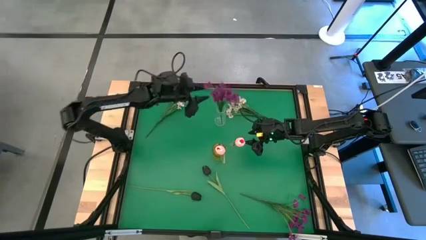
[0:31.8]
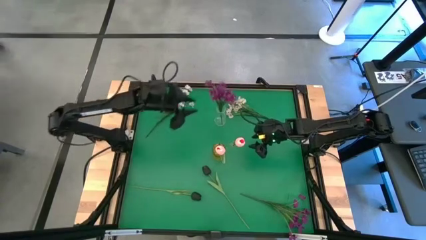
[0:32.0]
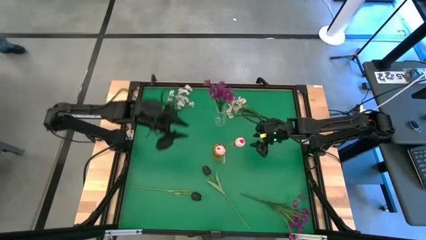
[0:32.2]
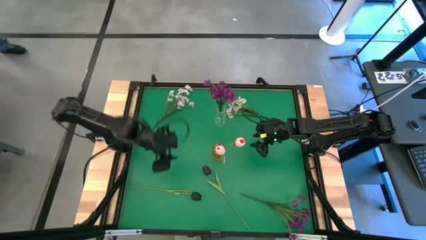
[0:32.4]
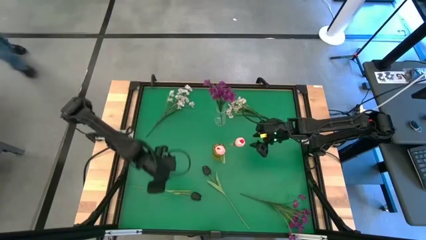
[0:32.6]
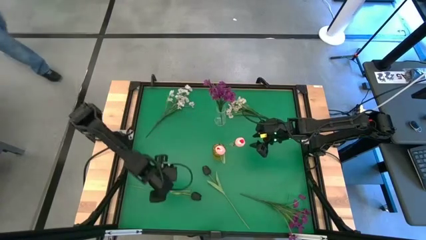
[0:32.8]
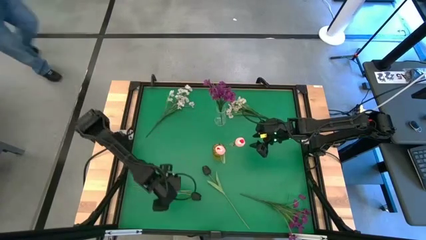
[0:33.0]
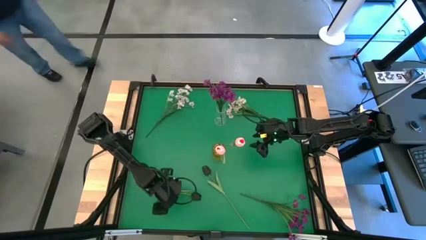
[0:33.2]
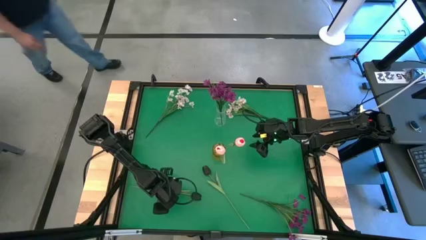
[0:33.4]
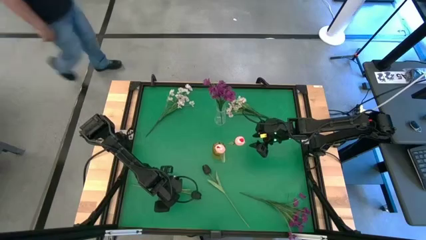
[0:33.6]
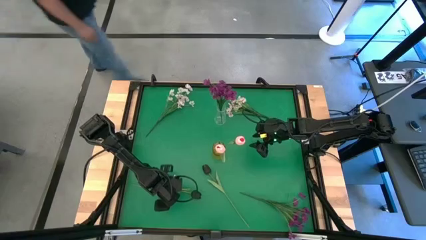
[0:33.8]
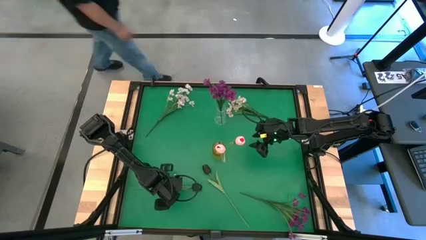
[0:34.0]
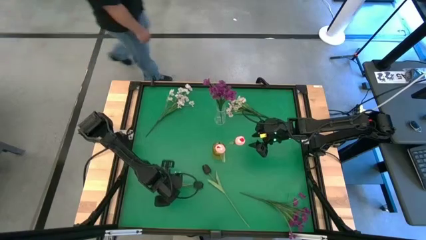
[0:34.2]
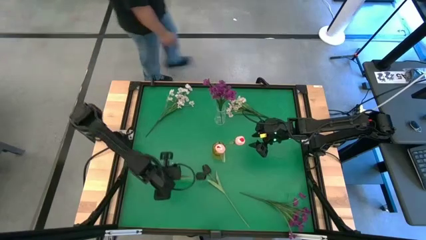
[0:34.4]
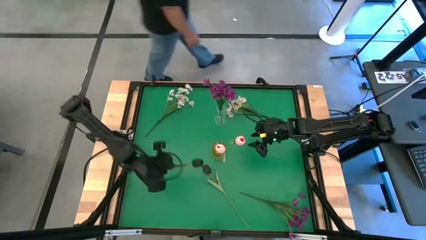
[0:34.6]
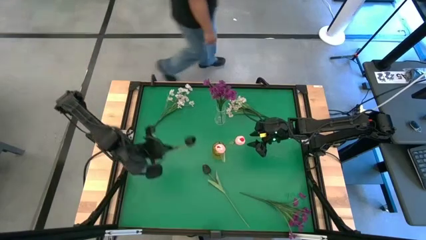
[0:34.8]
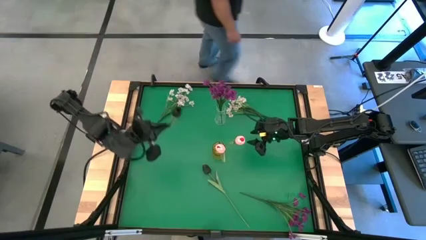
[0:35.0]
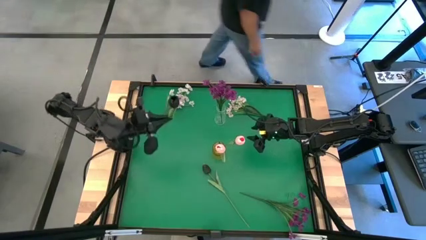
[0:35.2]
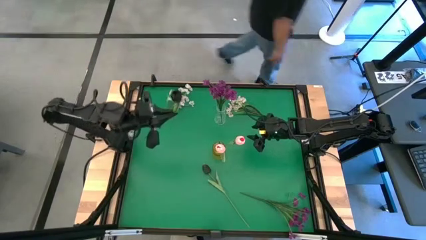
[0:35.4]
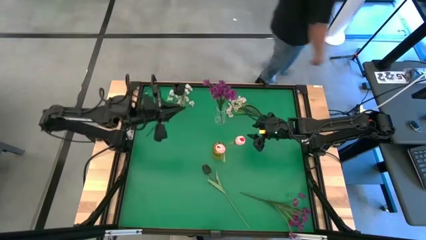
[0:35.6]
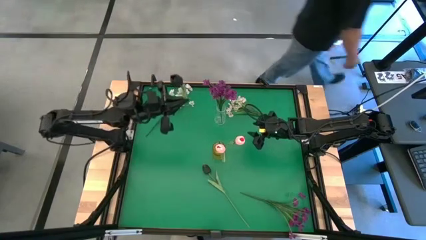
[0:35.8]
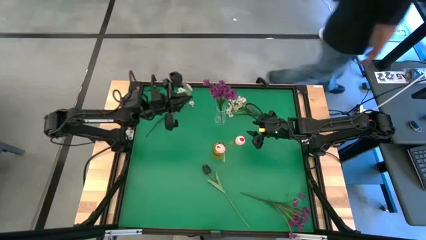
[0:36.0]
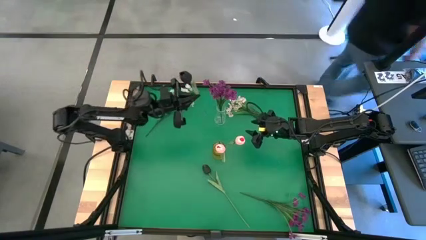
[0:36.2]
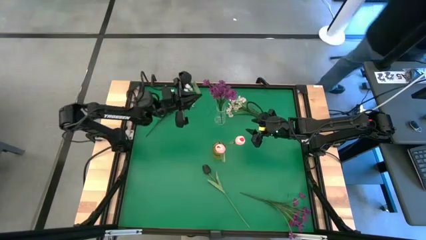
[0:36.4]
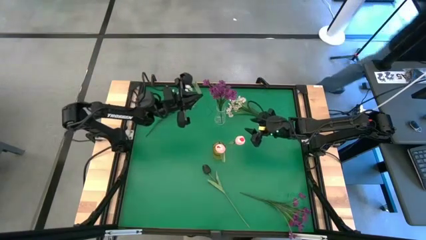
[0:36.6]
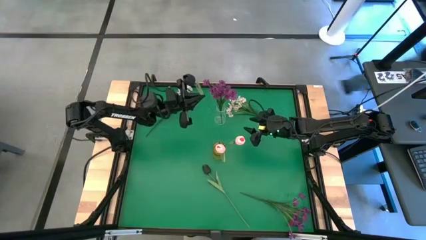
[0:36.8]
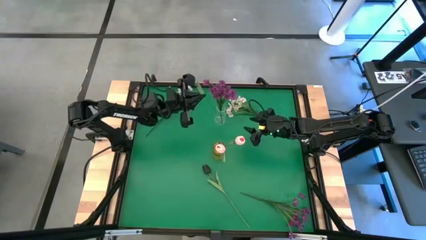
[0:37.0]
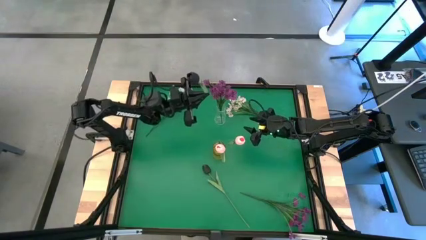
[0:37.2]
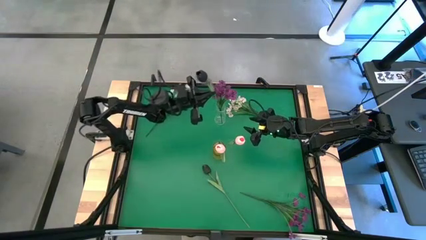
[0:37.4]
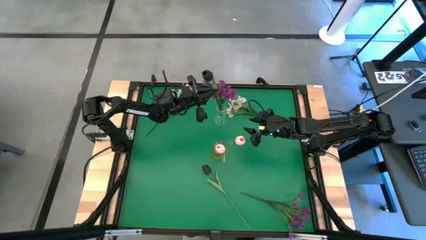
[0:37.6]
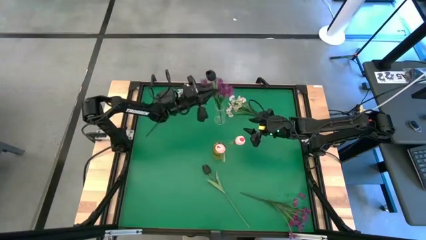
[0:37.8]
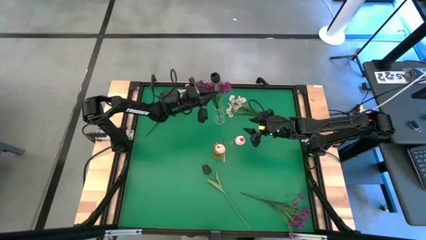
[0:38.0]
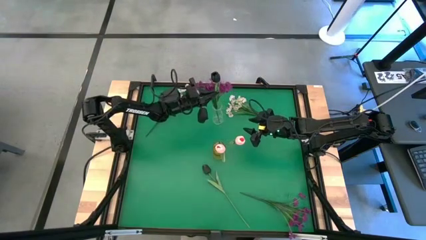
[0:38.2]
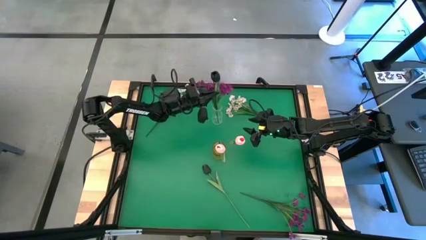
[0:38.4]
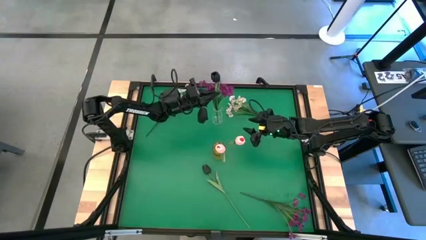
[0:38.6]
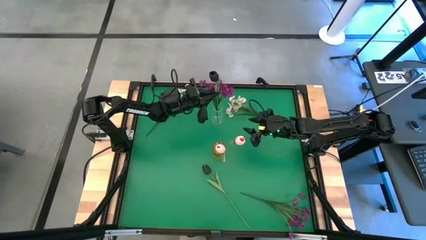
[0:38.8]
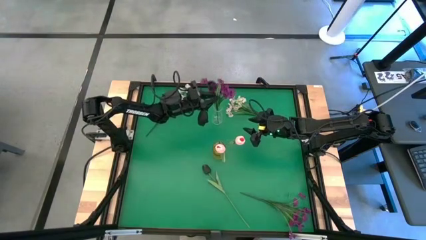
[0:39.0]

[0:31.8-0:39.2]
Task: Sort flowers into vase by color
Put the left black tulip into the transparent vase

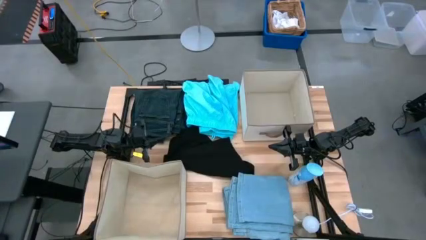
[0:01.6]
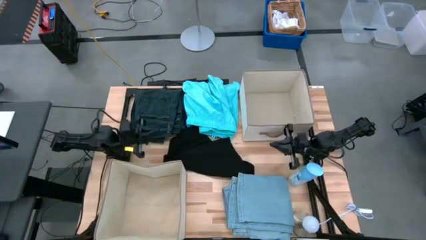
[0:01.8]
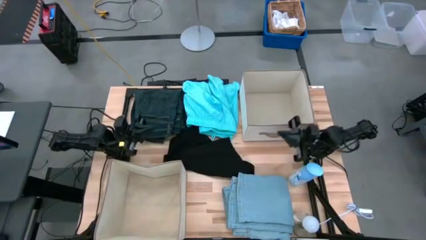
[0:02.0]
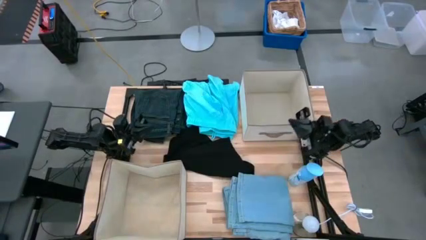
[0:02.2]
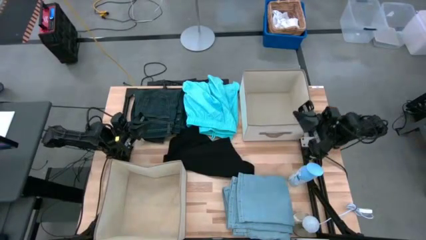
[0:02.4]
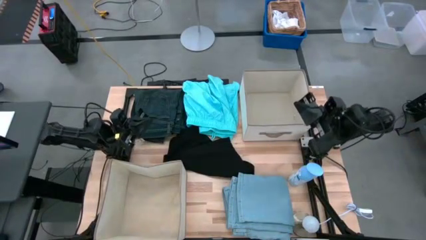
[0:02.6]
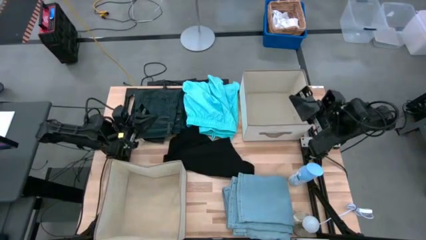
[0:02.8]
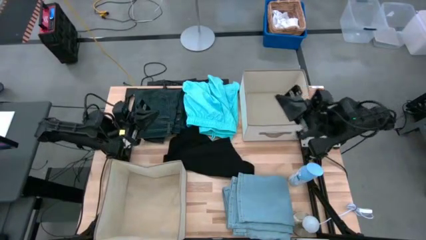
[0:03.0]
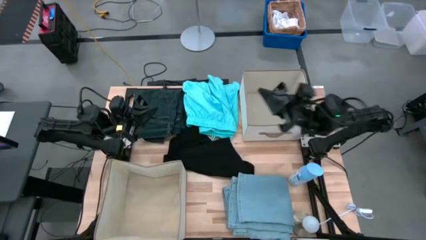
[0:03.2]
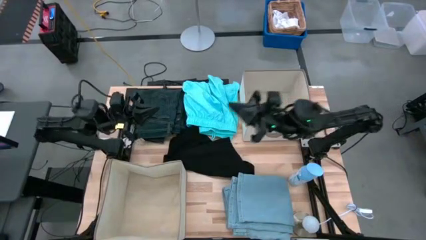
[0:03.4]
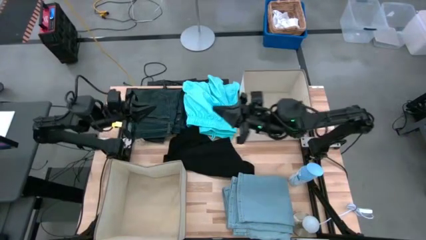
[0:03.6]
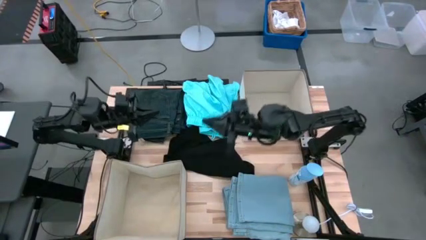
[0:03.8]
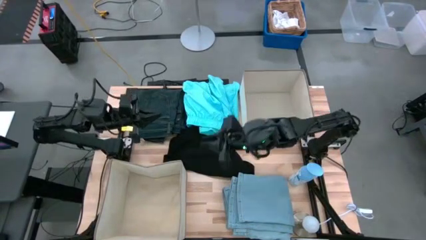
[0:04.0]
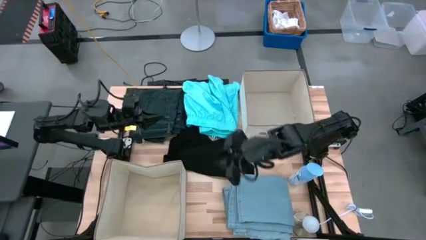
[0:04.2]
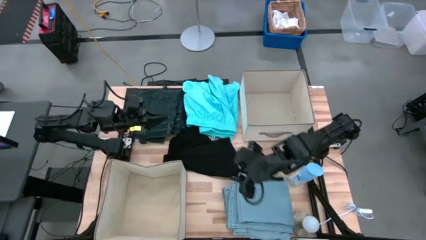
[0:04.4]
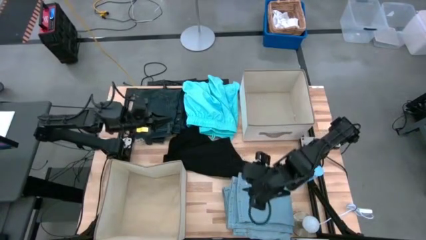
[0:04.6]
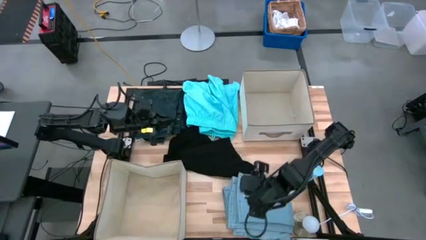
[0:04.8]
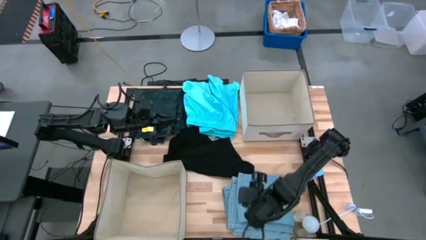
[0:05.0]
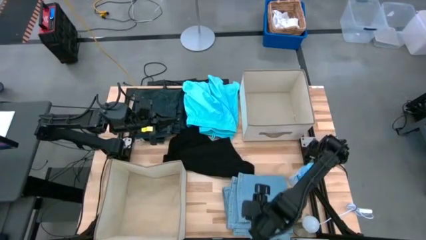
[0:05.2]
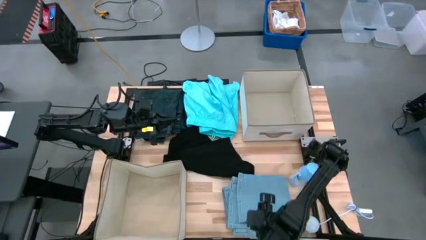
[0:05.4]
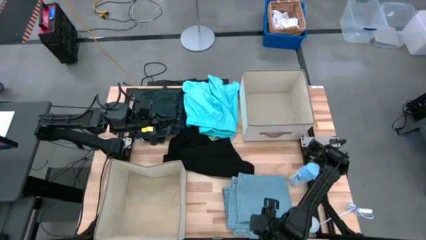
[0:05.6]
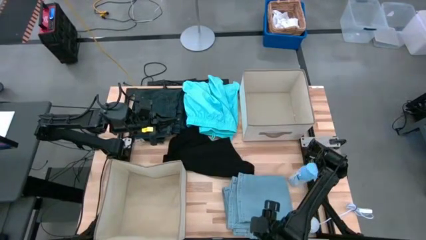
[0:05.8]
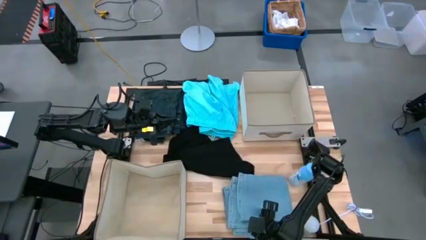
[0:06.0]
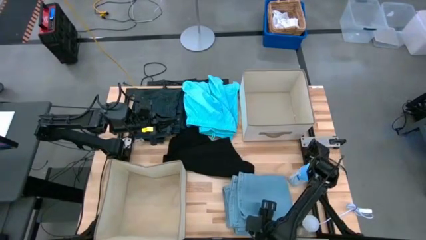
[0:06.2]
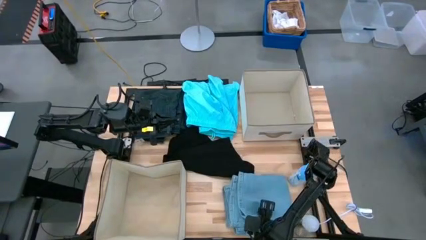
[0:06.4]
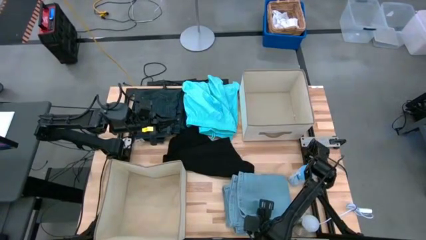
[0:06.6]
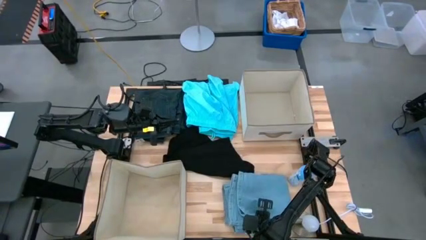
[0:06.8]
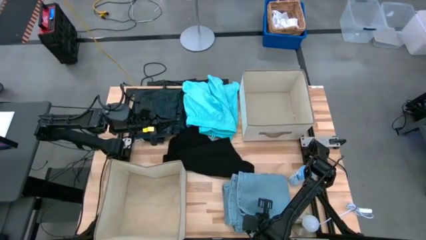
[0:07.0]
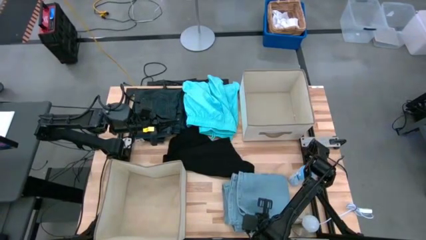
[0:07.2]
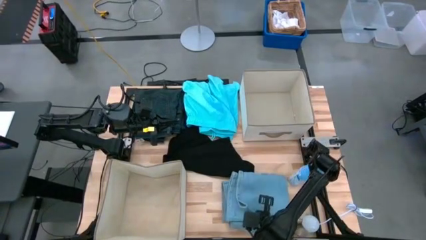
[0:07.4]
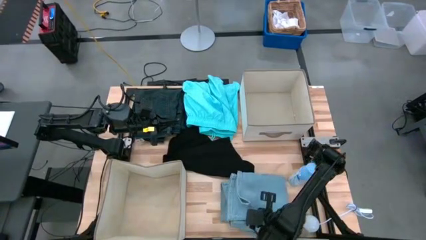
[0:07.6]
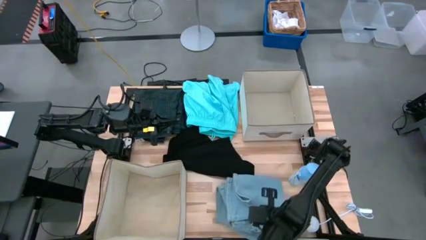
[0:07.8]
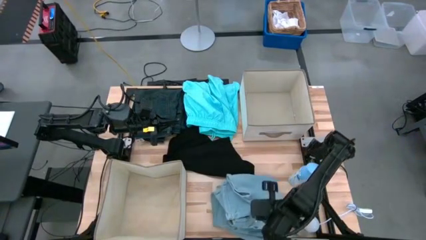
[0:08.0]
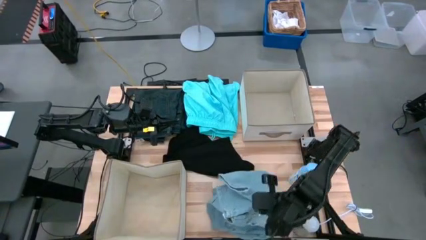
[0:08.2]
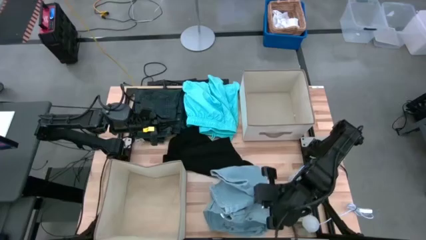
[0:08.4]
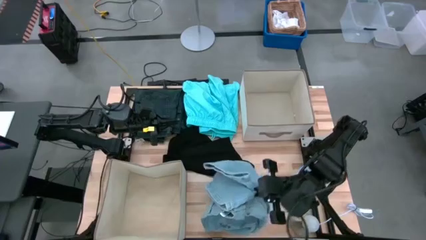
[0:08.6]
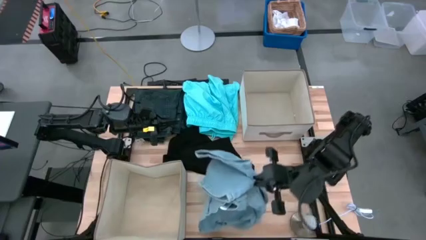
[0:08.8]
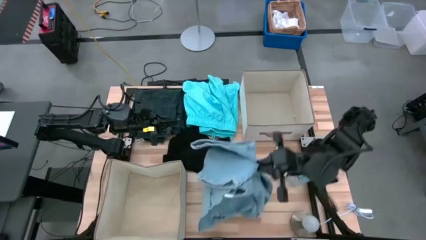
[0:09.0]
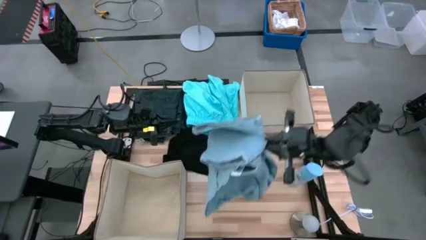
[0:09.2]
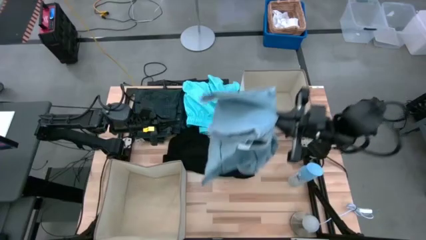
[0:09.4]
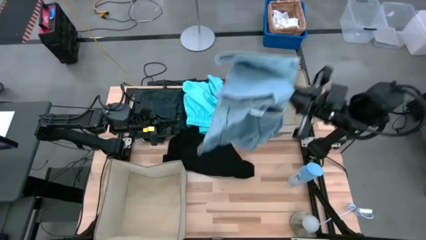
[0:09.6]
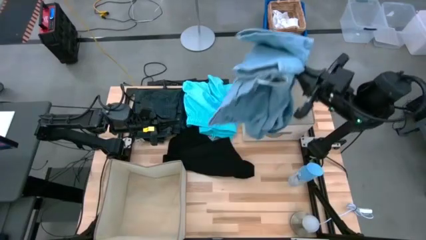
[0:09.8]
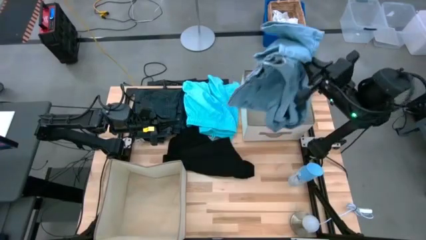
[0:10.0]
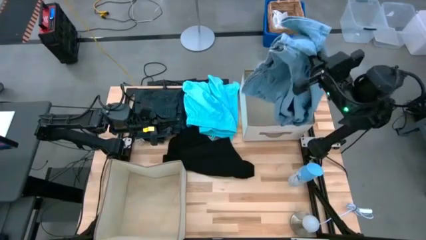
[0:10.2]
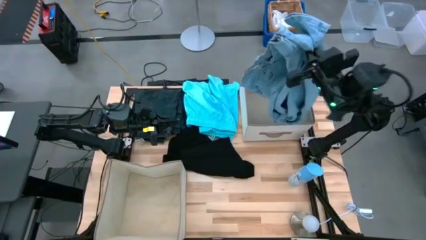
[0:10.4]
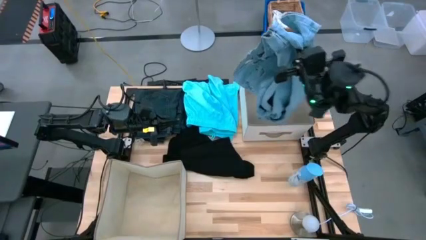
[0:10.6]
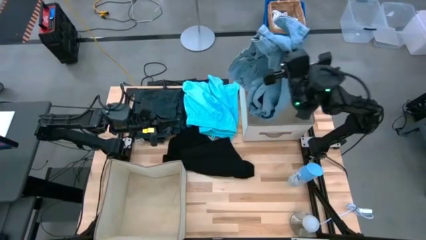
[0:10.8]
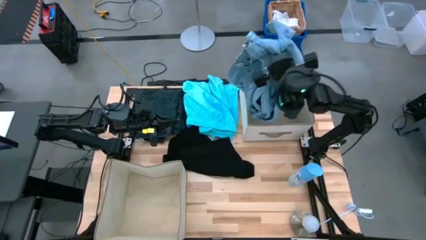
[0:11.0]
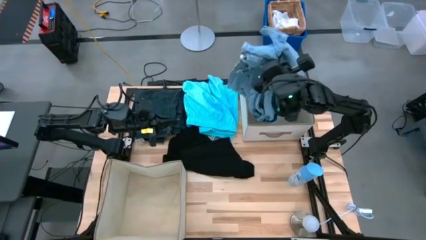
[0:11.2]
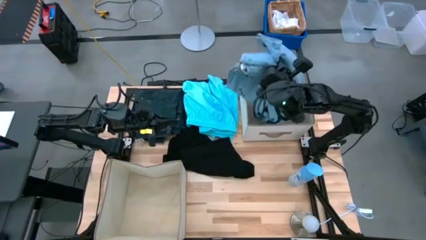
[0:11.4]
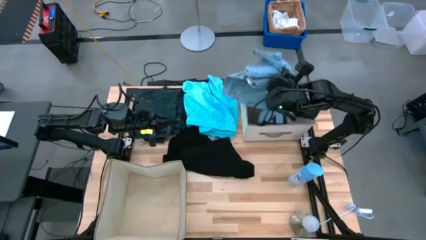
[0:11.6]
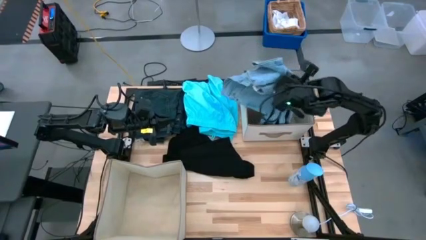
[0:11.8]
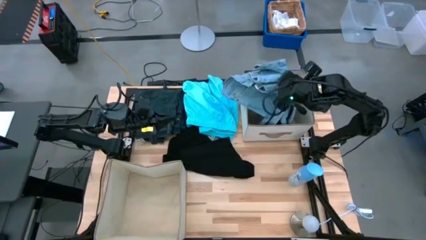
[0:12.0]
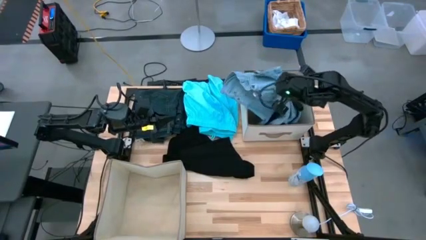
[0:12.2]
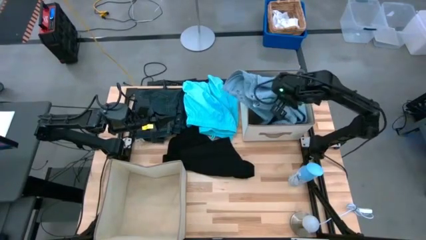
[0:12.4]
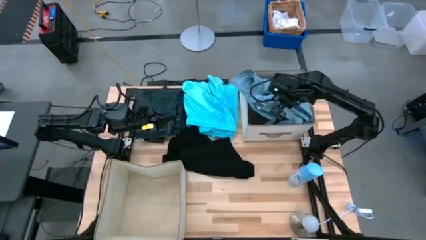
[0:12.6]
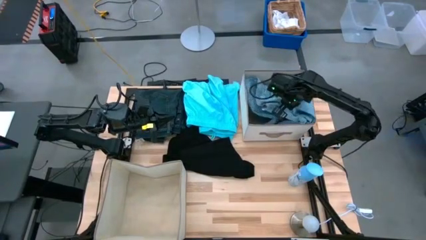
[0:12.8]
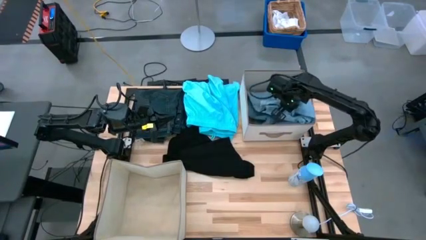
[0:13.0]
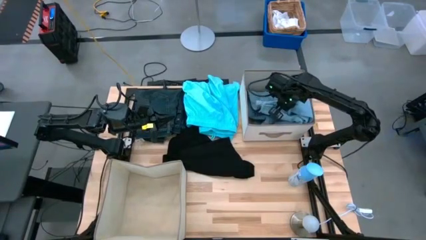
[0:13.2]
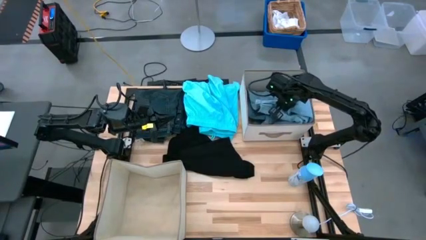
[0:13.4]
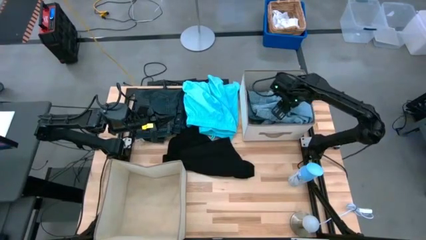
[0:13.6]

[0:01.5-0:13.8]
Task: Sort clothes
Put the blue pants into the top laundry bin
